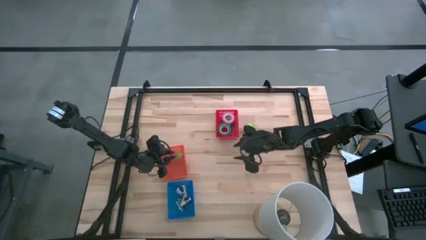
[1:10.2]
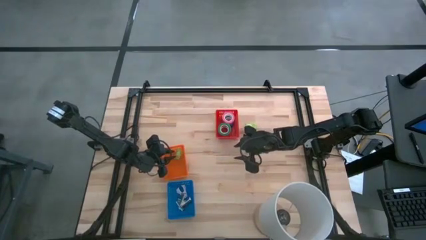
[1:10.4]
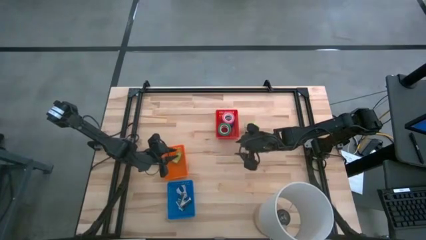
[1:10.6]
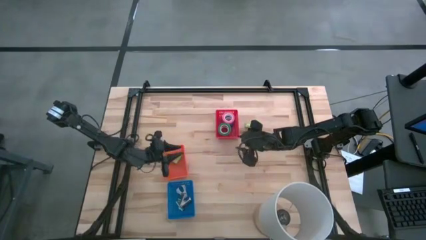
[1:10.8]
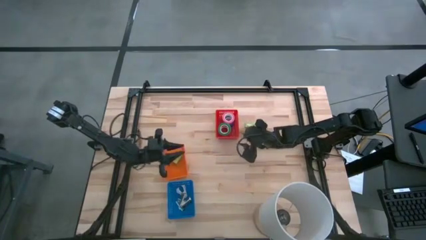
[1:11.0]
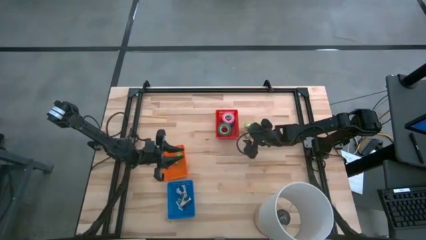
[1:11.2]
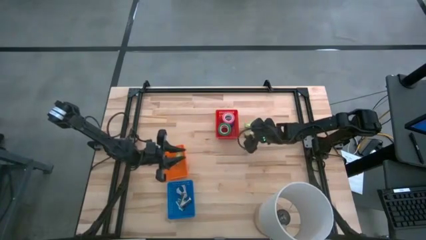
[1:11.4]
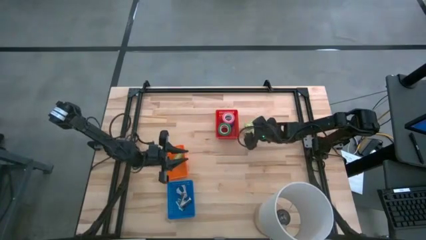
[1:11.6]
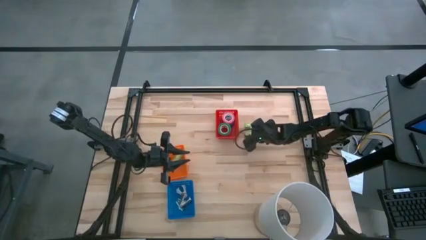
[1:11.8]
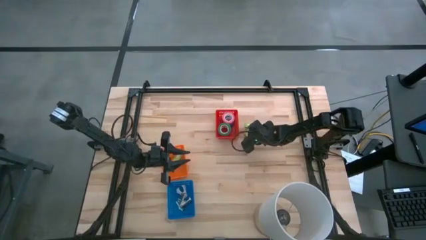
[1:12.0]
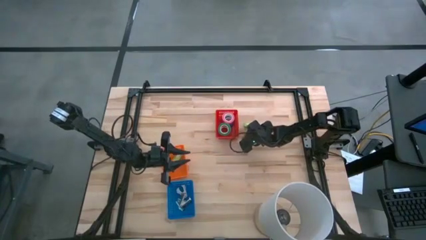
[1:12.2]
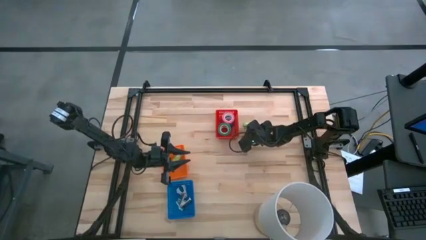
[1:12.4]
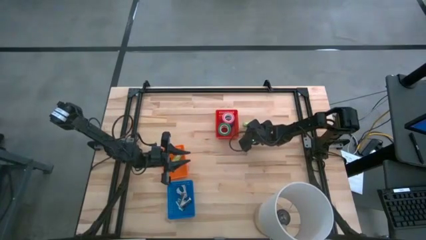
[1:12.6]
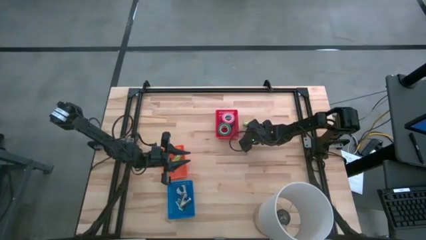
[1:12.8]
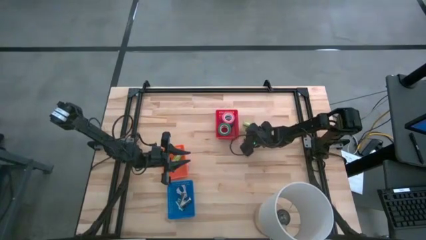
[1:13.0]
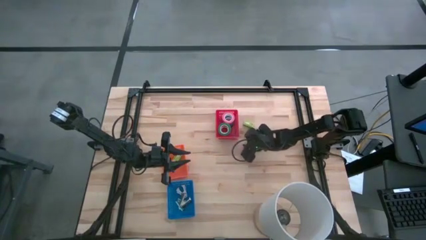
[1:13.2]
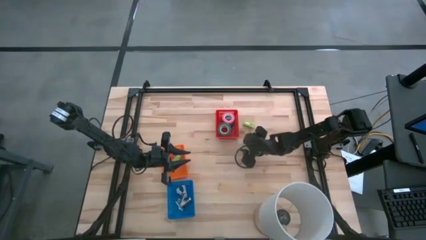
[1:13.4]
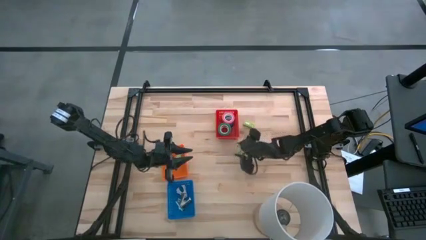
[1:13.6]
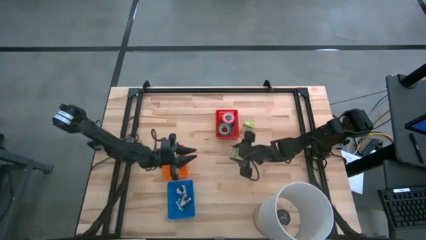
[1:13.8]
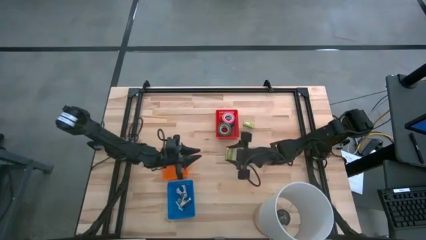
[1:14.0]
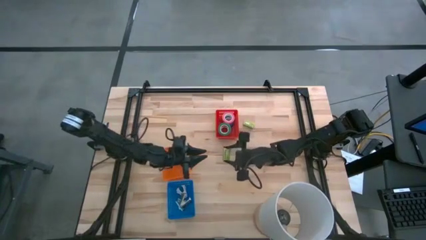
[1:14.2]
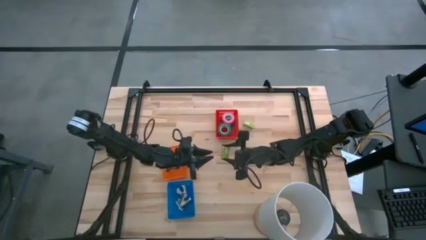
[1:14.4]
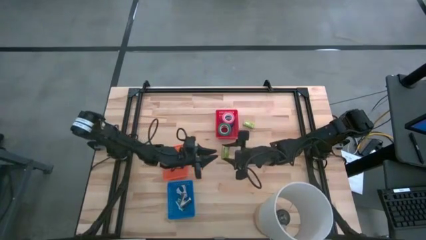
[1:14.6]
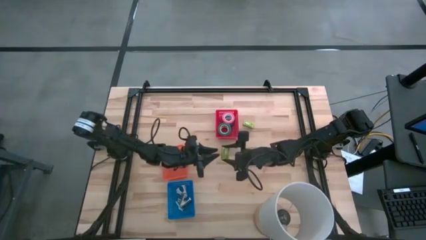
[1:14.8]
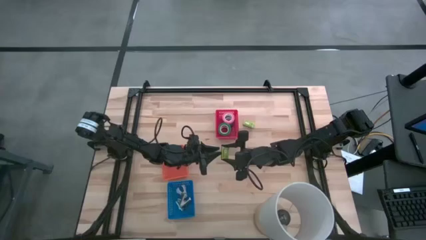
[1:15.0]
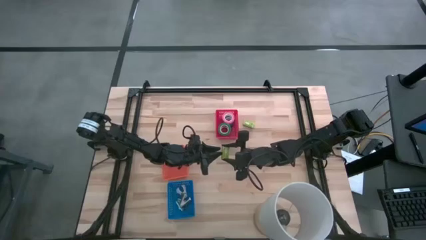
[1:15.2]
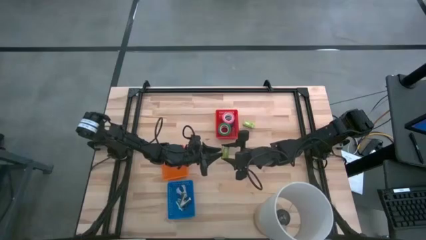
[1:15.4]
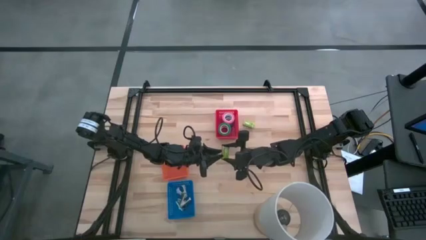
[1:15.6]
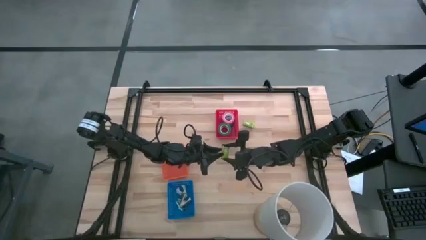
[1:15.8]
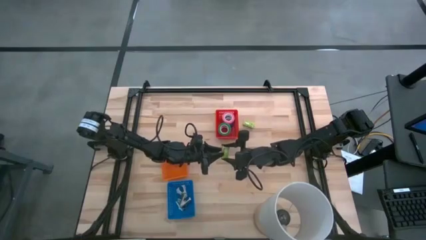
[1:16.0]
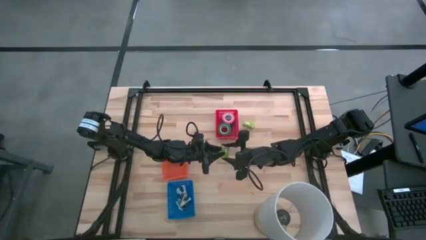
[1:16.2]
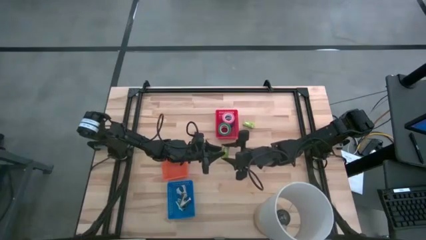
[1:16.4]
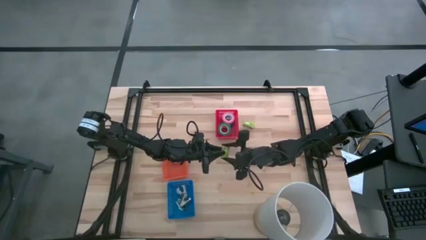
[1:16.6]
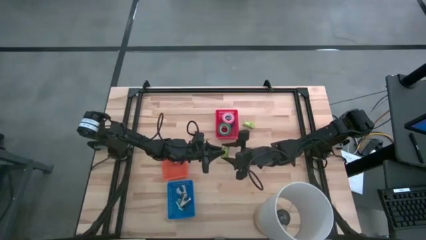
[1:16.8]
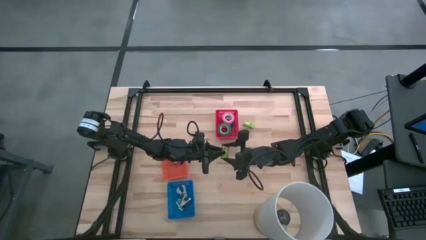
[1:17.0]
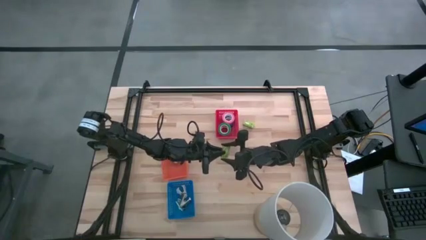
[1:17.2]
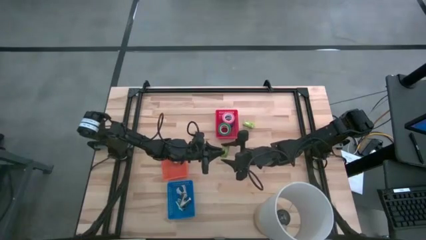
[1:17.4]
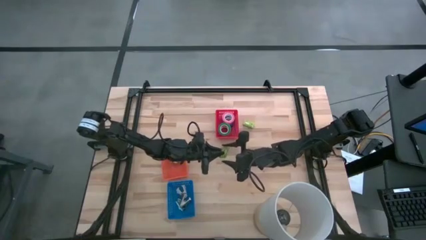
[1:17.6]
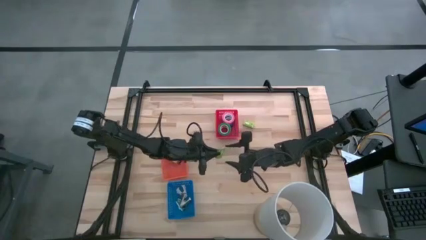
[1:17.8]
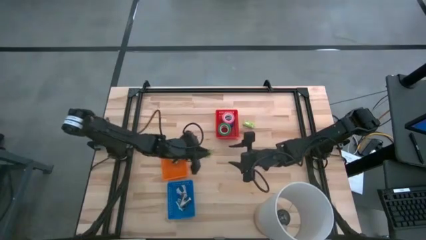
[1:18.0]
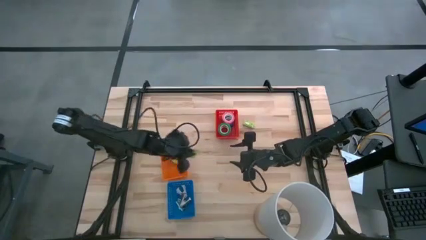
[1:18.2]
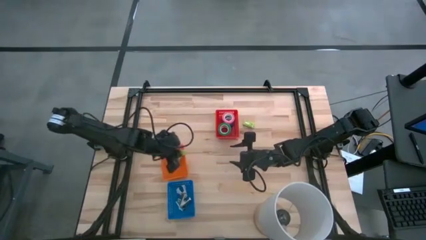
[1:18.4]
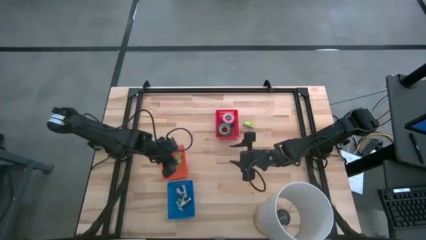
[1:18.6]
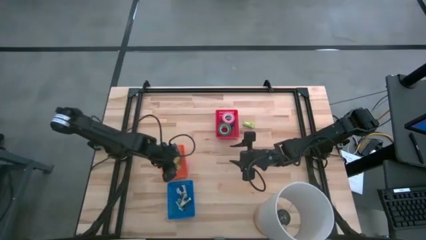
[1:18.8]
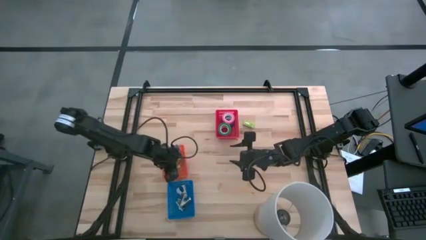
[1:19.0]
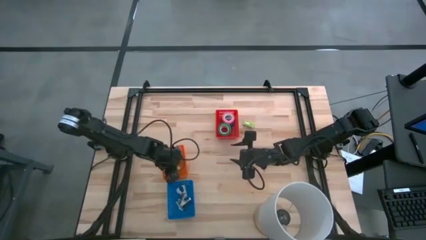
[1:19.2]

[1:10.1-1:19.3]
Task: Pick and place Stapler, Stapler remover, tape
Put the bottom green staple box into the orange bin

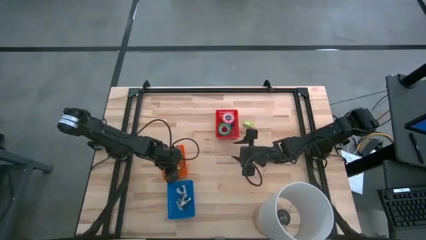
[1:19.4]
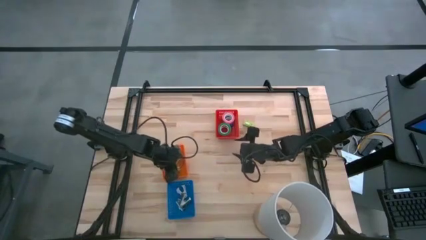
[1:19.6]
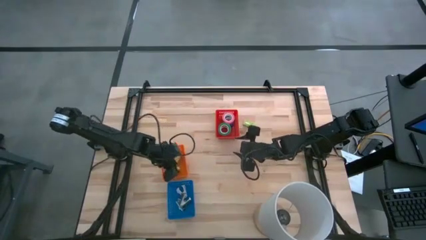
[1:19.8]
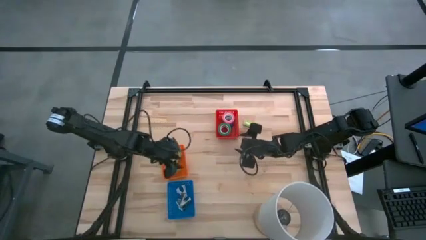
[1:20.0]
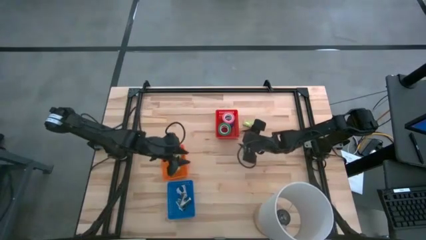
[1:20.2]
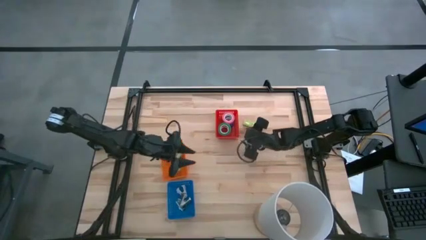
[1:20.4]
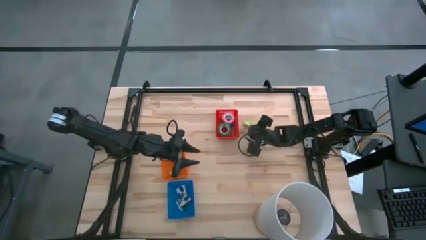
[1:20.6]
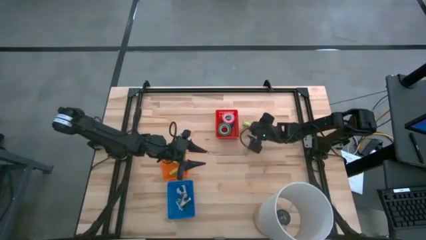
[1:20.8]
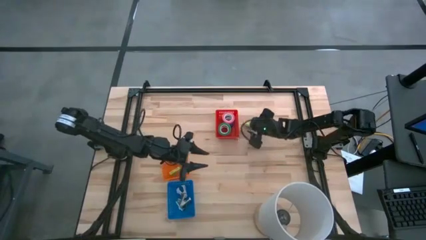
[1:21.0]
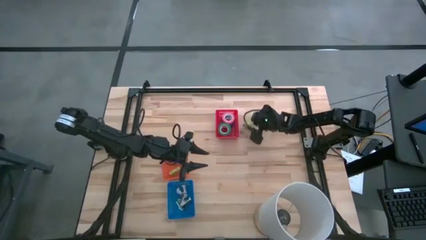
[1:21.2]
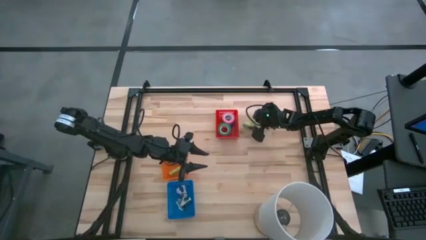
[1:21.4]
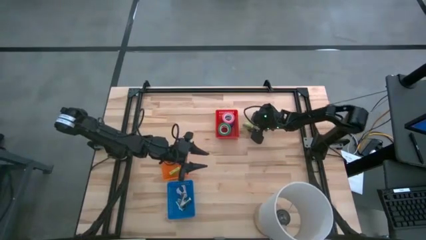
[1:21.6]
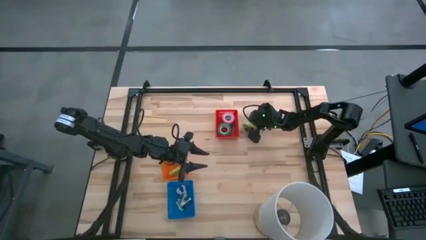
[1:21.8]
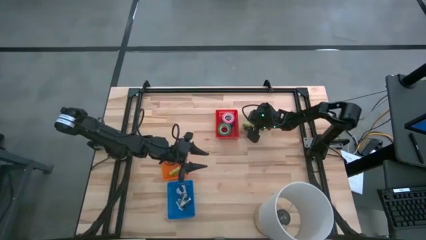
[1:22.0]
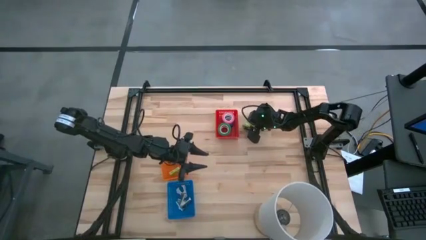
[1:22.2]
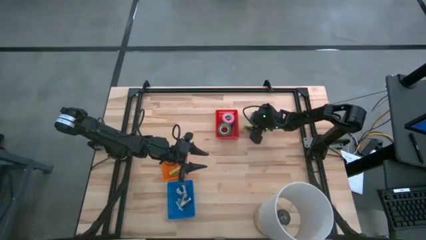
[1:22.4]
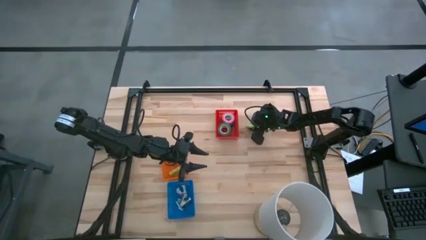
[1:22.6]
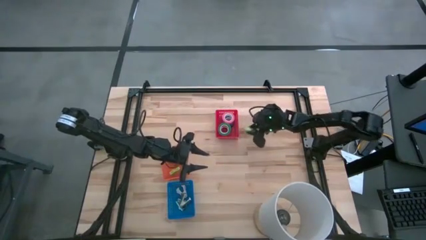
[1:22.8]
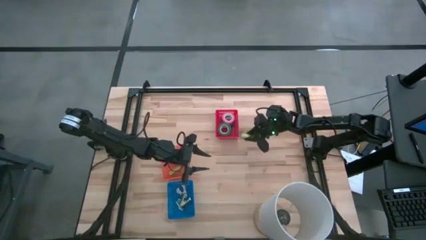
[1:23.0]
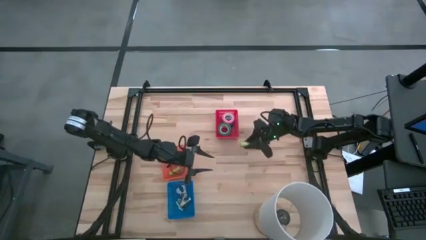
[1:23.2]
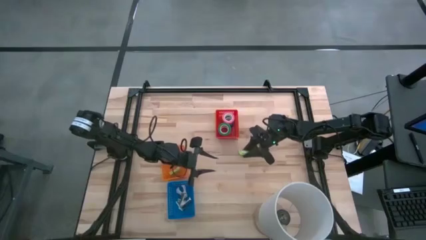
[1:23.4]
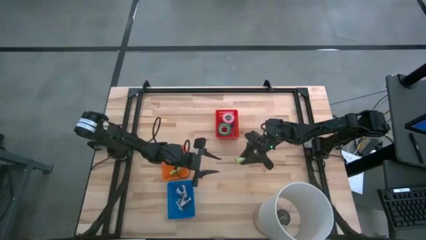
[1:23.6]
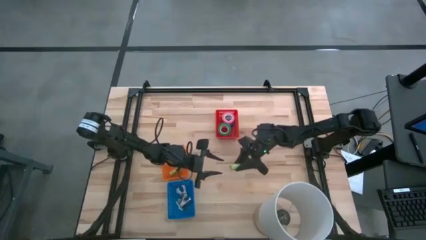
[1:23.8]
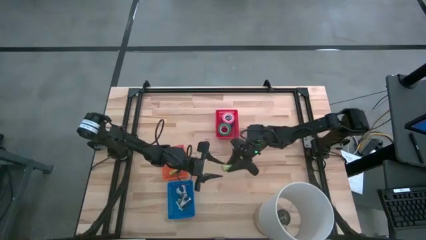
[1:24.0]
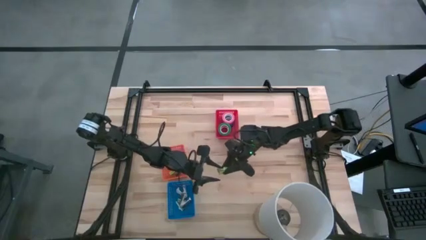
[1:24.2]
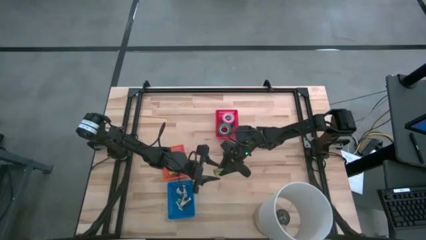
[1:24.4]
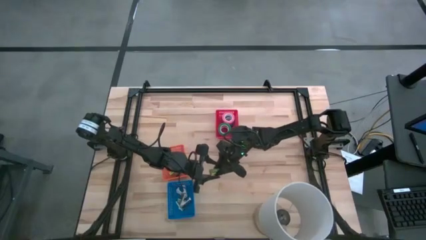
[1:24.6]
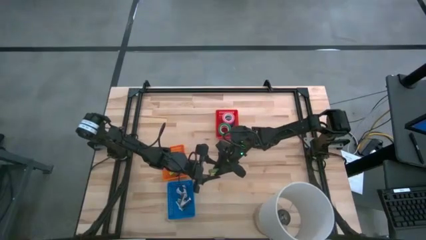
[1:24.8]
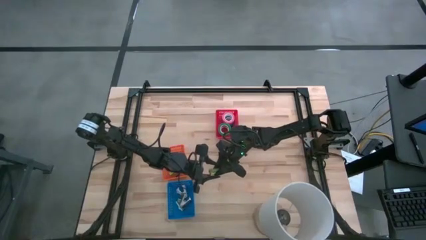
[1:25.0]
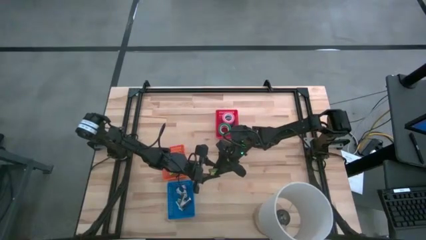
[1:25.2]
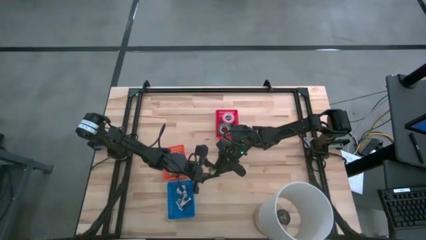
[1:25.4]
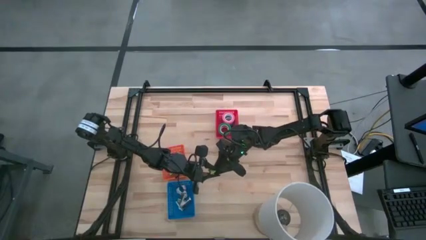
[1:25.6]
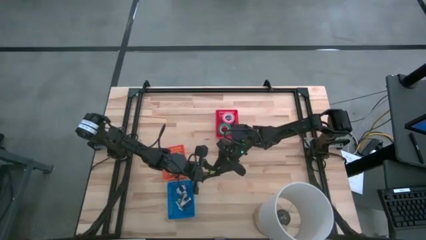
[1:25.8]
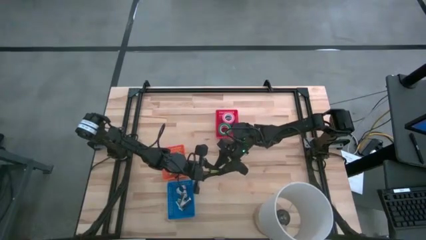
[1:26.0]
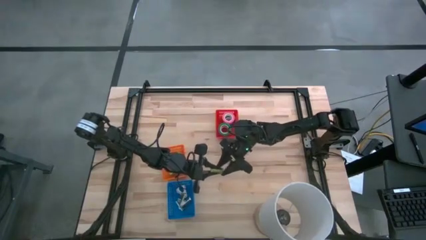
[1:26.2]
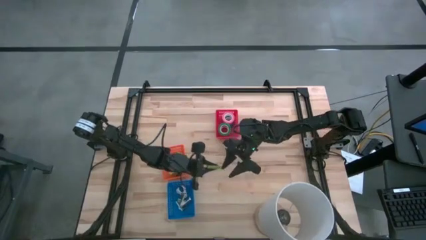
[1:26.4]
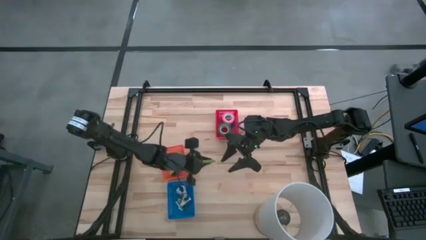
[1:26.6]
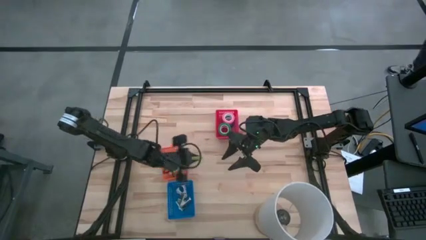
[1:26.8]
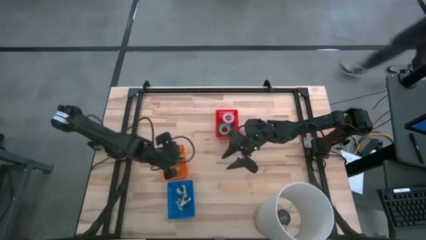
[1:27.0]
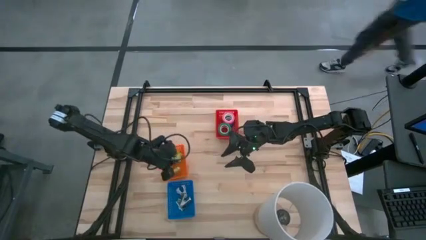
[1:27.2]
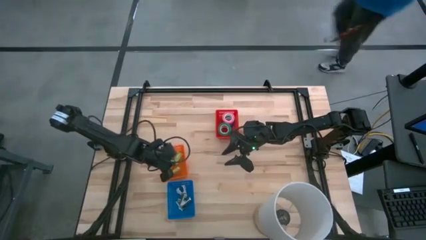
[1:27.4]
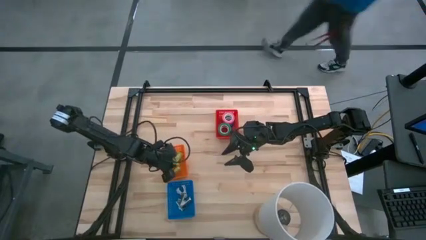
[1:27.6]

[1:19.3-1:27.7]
Put the green staple box into the orange bin
